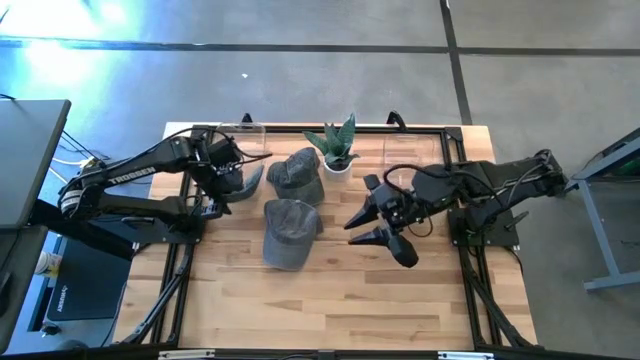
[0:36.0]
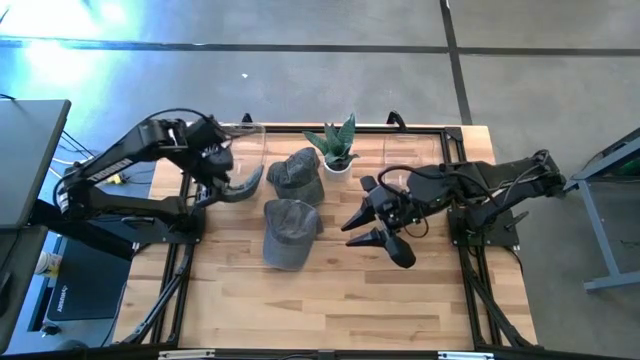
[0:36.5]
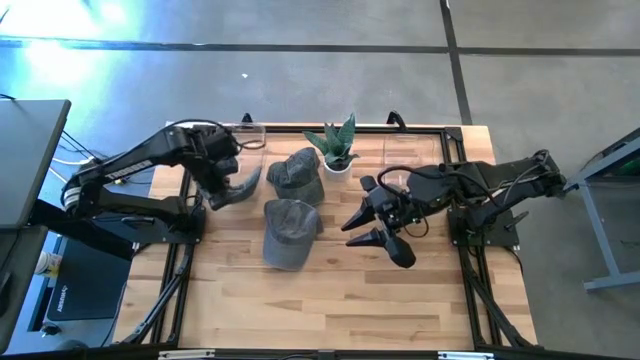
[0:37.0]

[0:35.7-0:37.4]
Task: Pick & Place hat
Adjust the green cap in the left bin

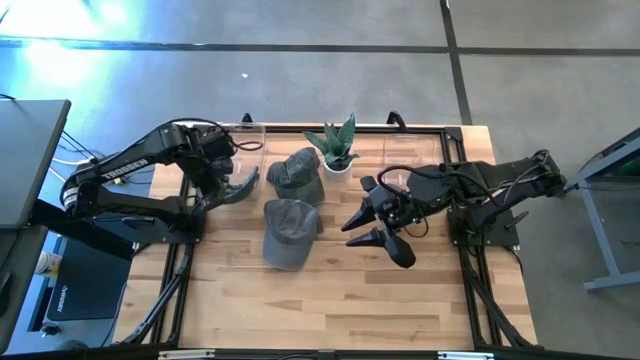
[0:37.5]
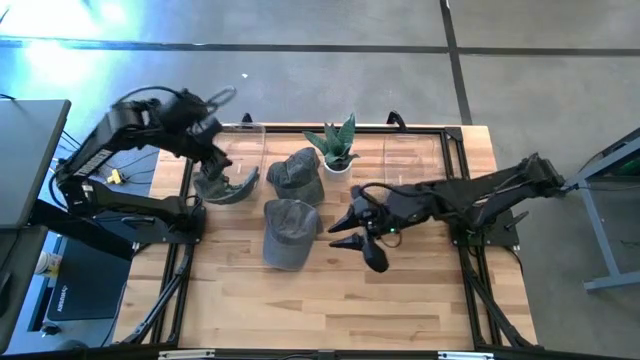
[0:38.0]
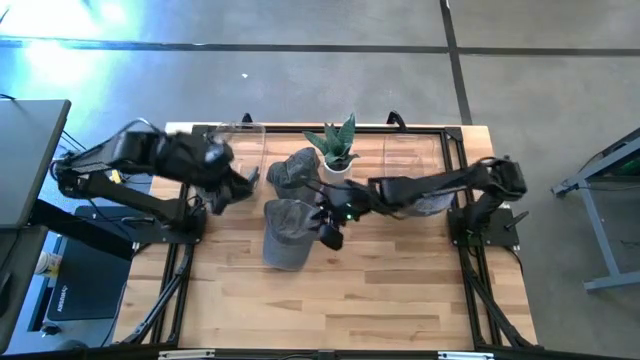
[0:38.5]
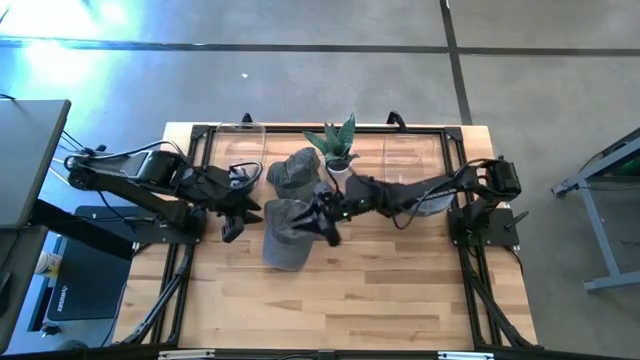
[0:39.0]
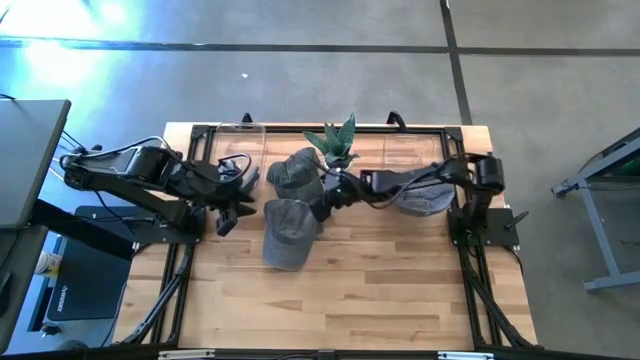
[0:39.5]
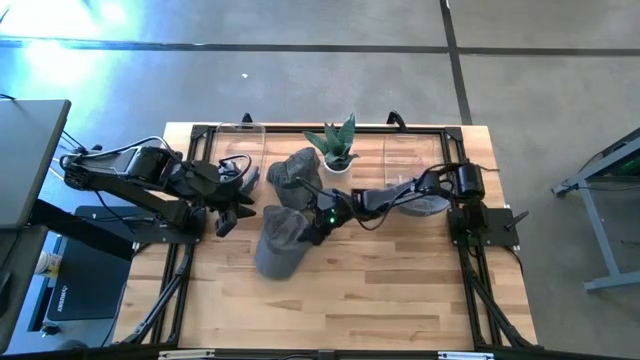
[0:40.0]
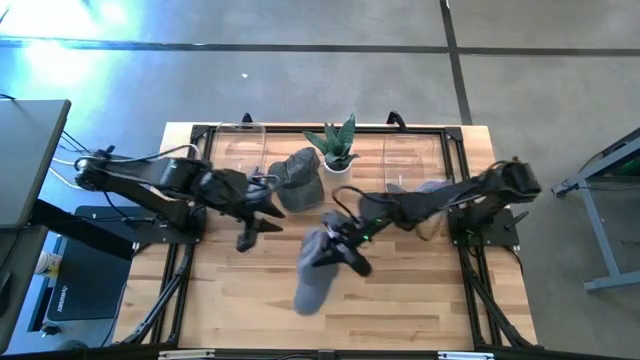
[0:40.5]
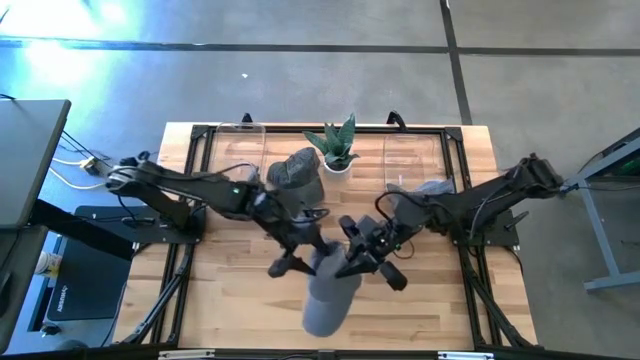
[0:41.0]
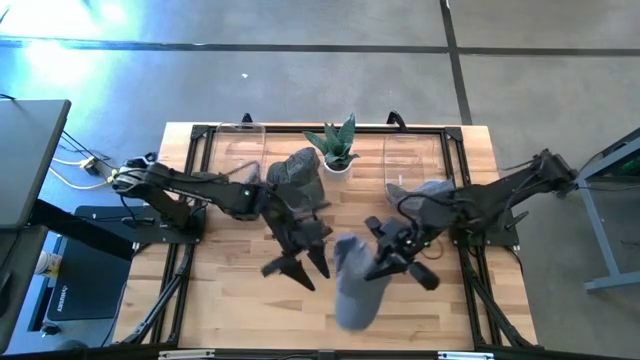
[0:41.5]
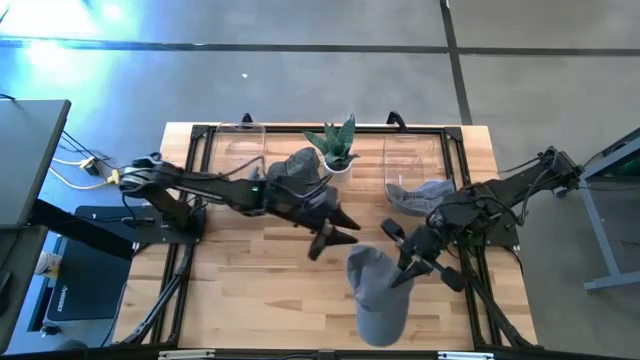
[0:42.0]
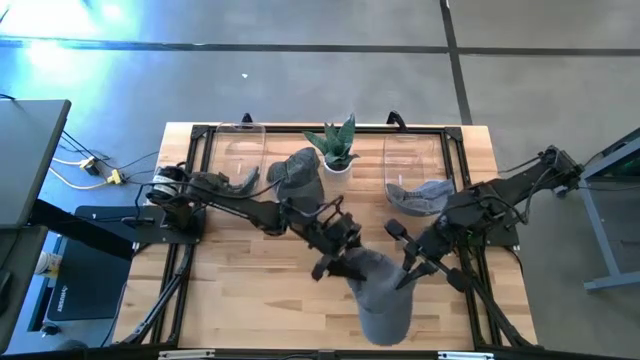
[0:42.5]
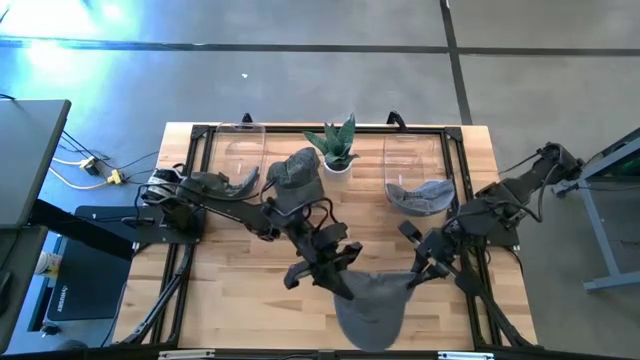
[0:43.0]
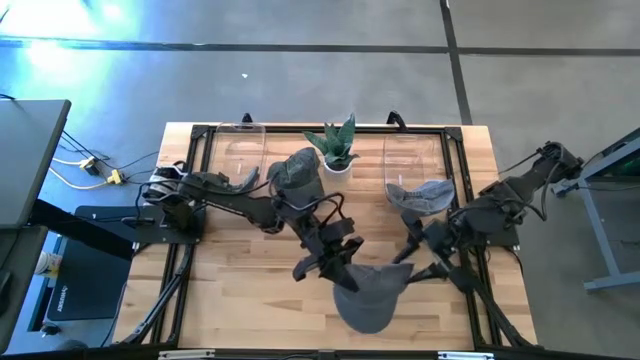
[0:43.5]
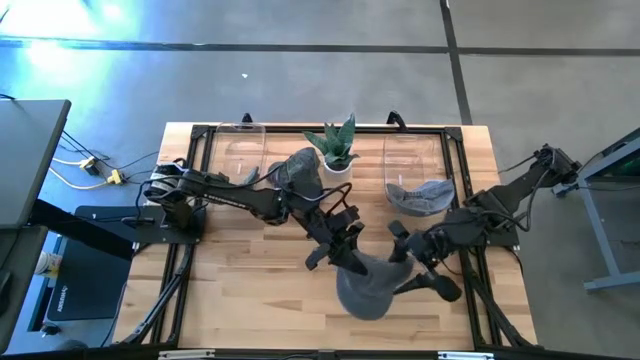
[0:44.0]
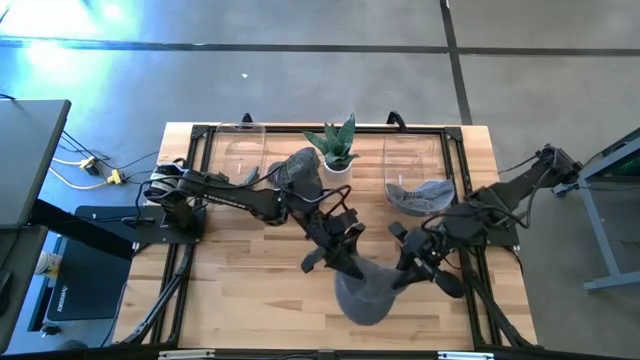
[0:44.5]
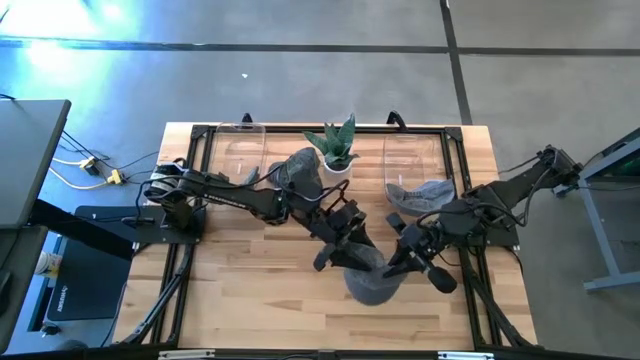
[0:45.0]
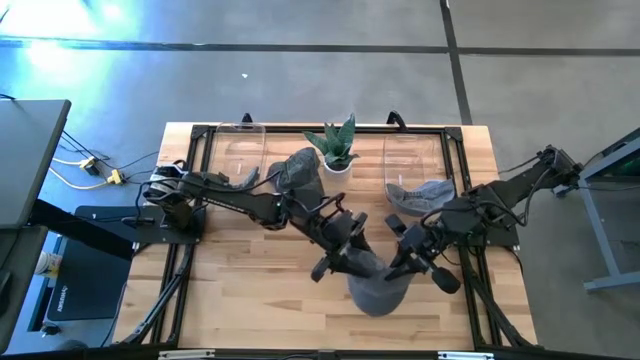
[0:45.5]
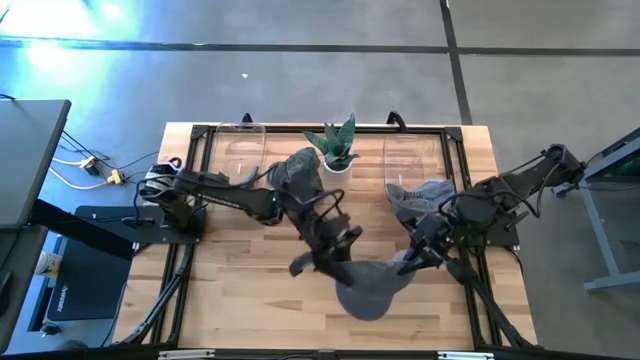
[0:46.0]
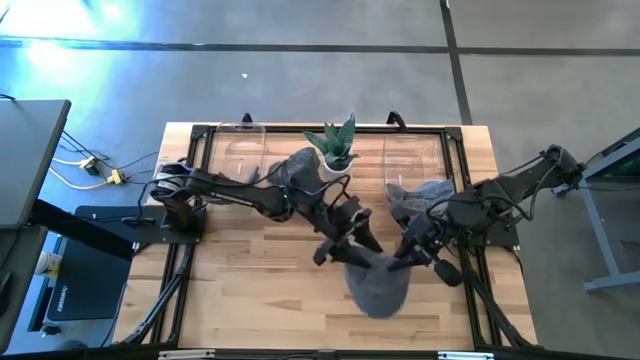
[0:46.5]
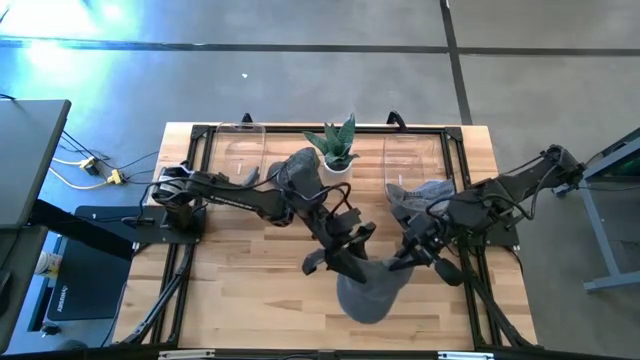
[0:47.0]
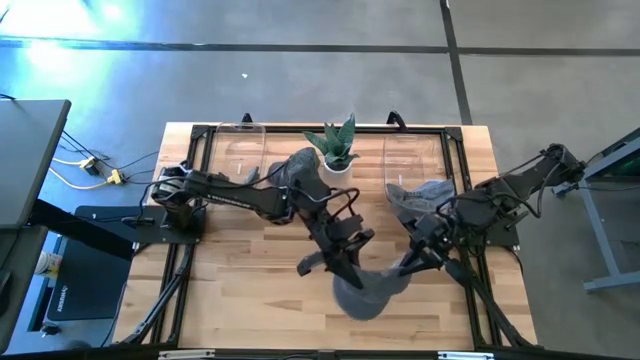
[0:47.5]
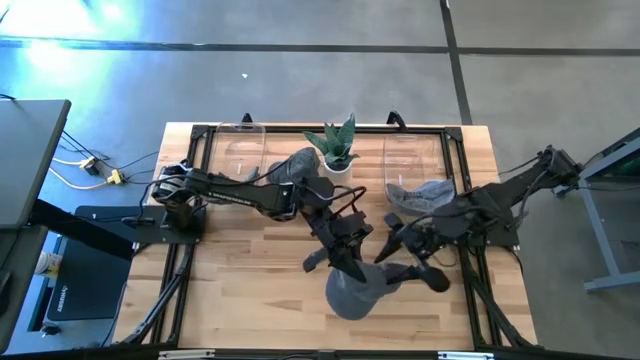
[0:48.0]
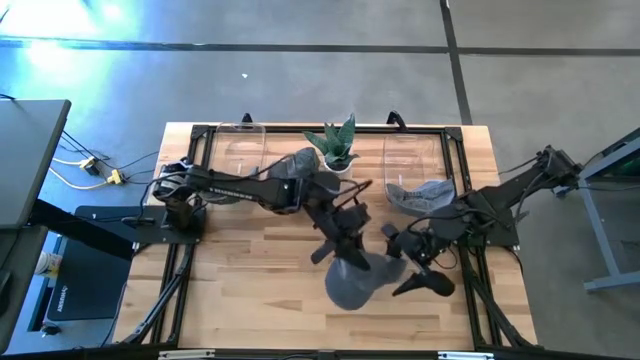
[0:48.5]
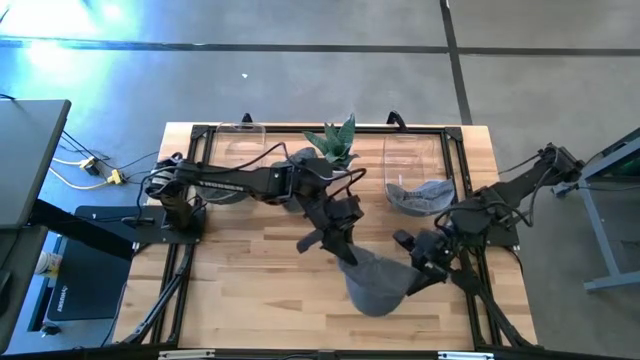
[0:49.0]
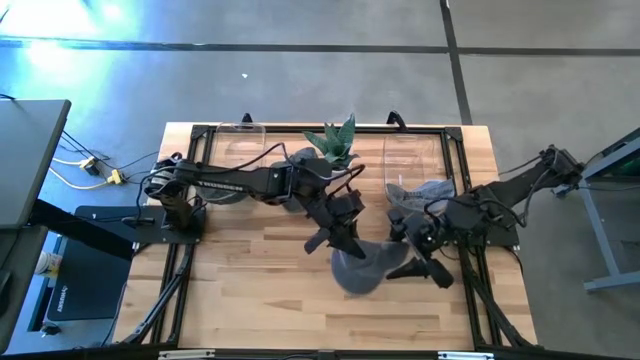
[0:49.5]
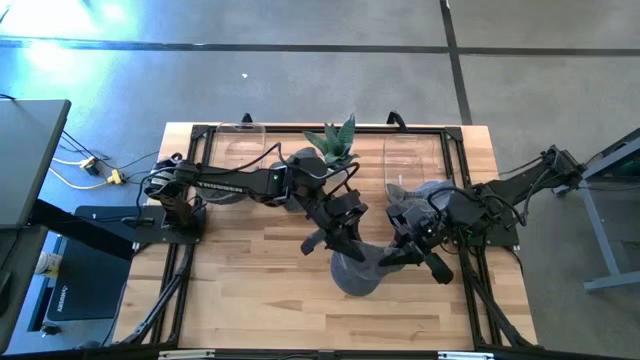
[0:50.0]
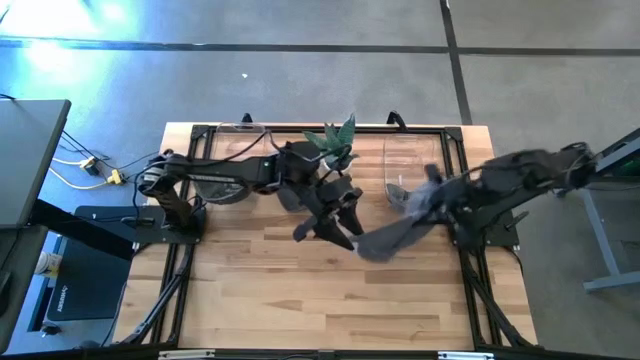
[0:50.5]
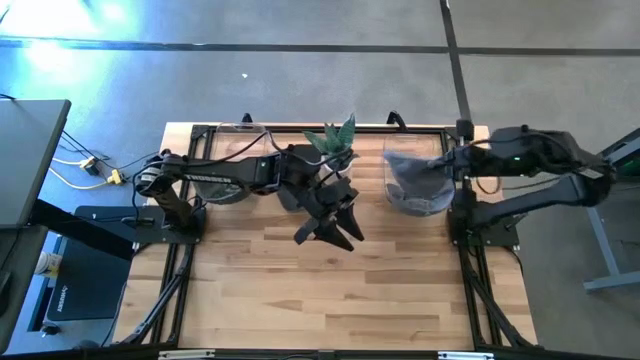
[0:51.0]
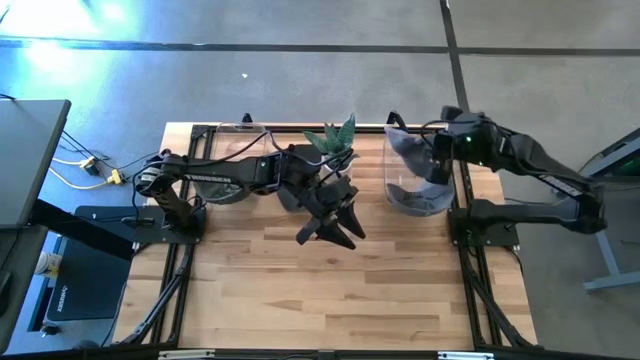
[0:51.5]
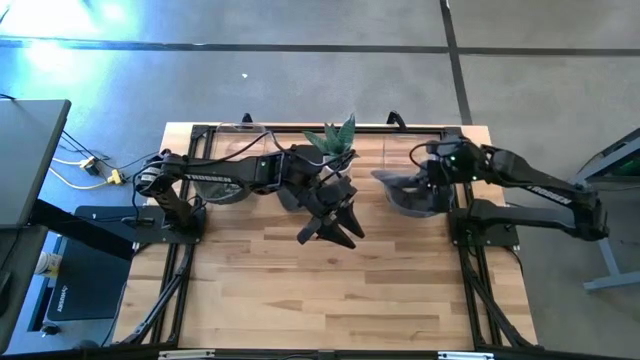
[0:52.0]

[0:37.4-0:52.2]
Put the gray cap into the right bin

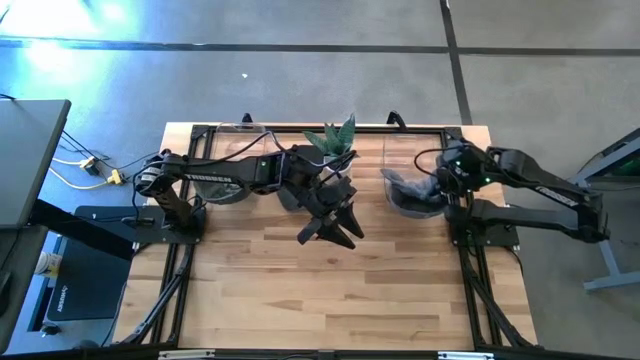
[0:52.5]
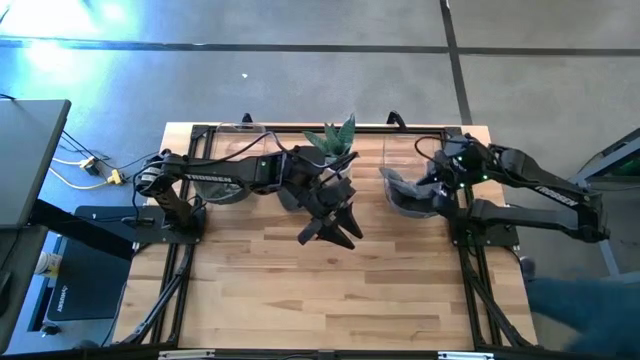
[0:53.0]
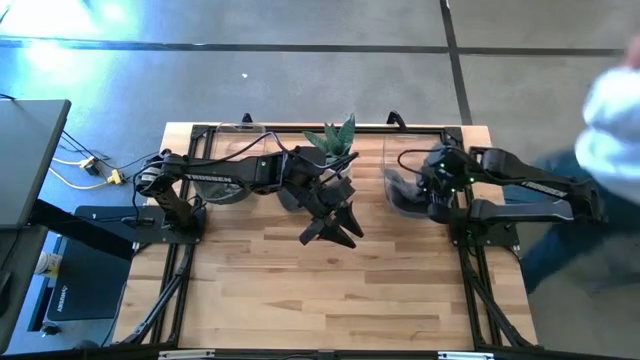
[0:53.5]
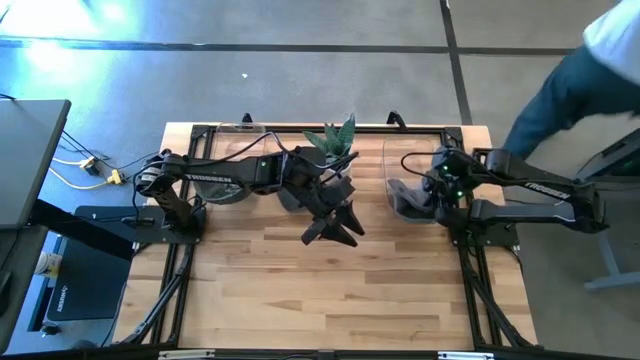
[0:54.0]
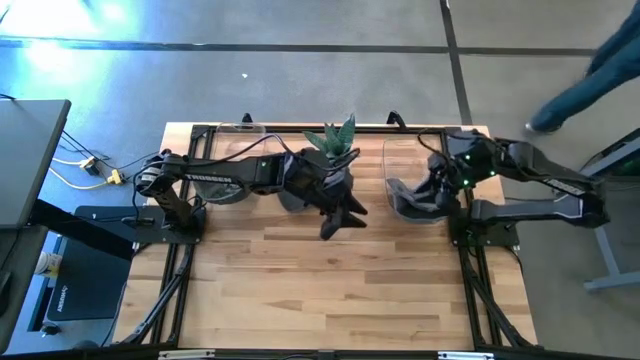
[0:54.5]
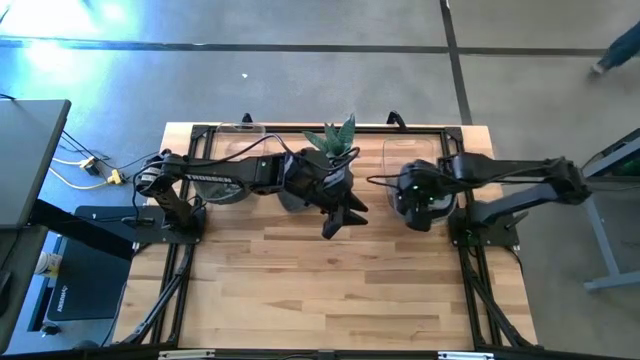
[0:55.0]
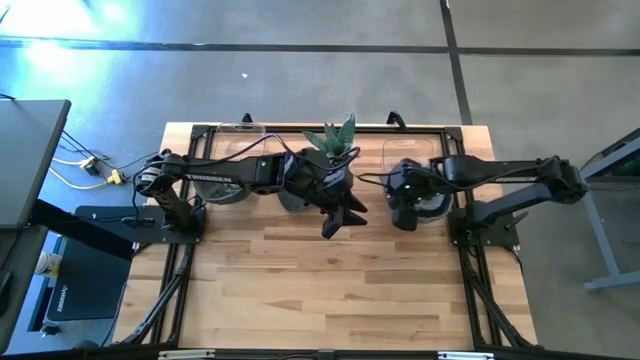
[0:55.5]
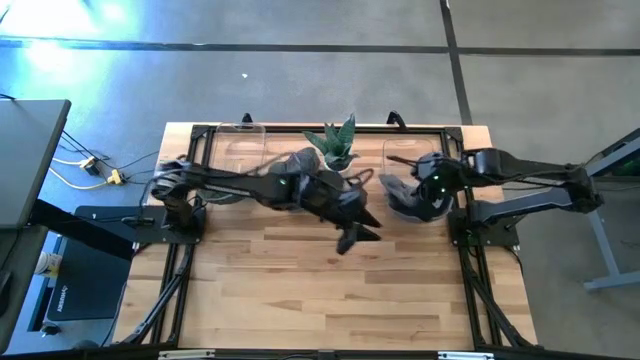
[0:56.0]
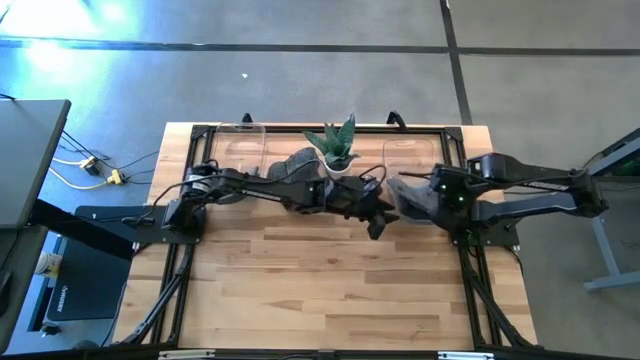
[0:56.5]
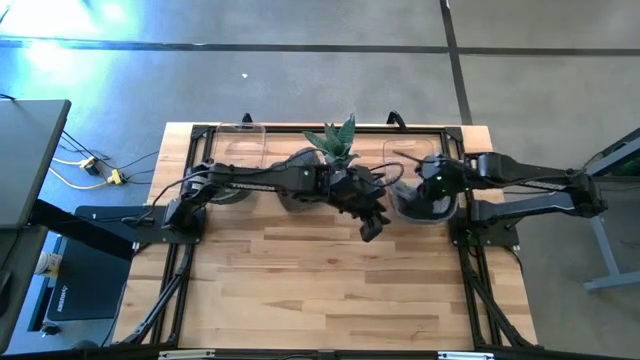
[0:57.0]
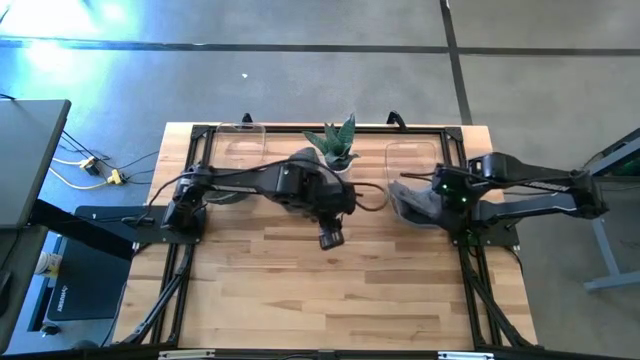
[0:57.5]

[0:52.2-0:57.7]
Adjust the caps into the right bin

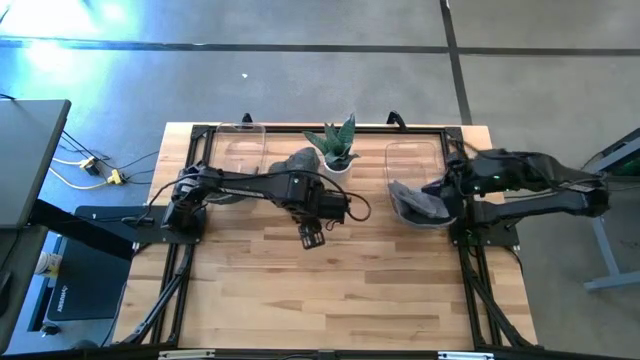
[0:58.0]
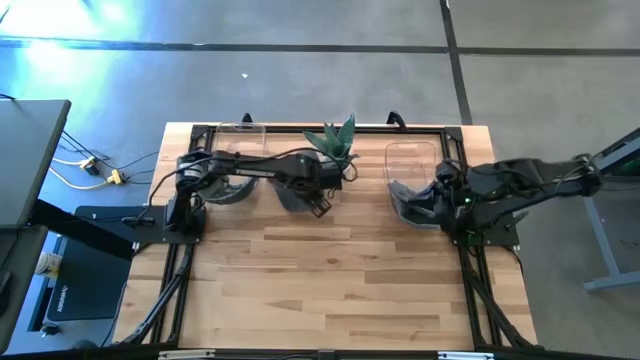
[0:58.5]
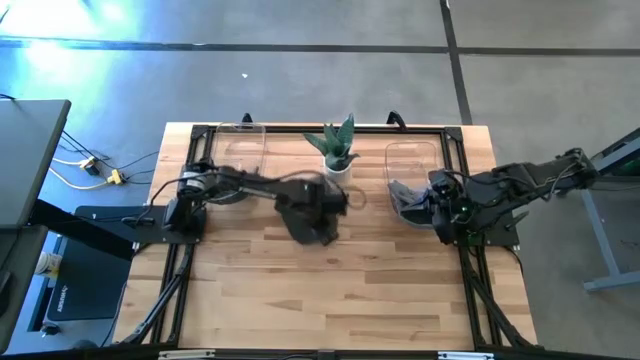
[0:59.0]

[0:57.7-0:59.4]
Put the green cap into the center of the table
